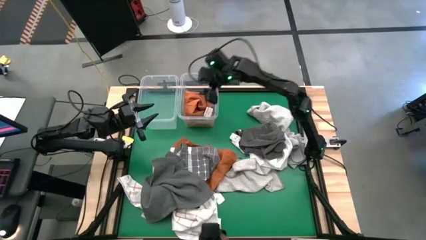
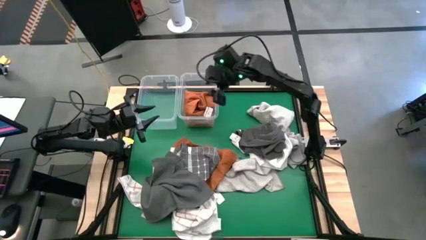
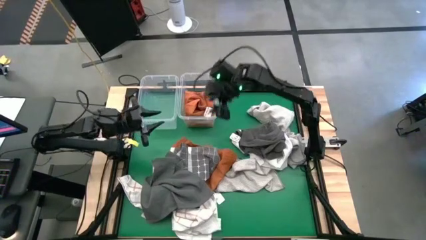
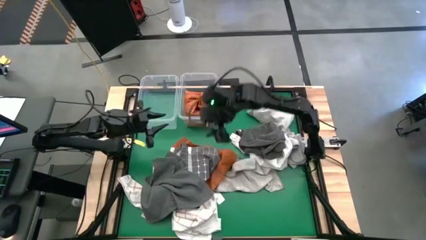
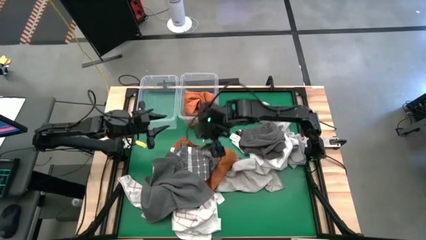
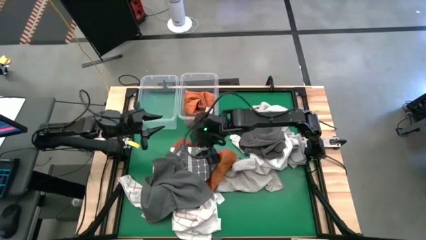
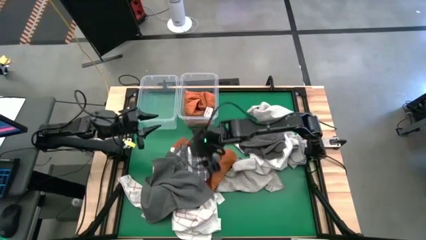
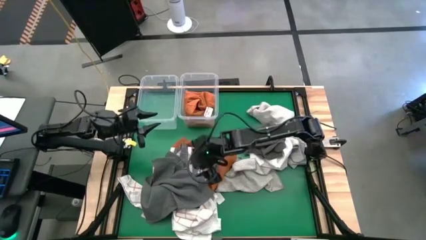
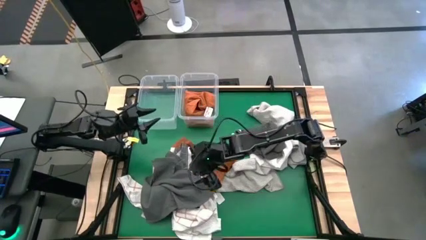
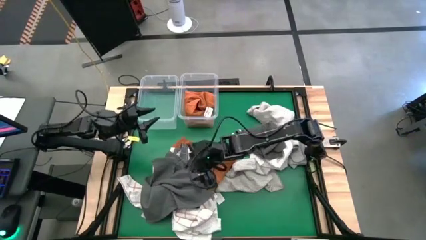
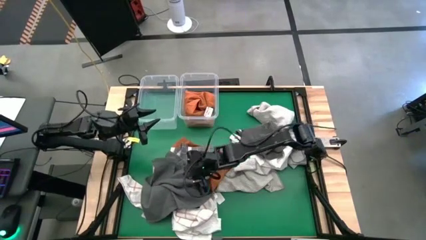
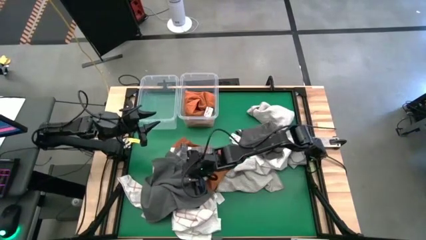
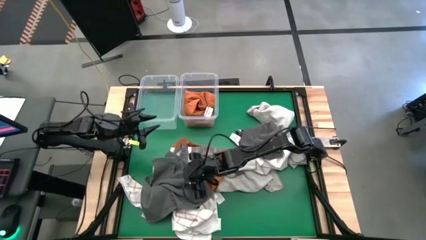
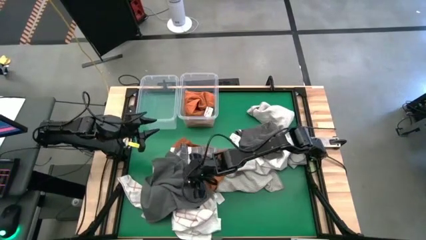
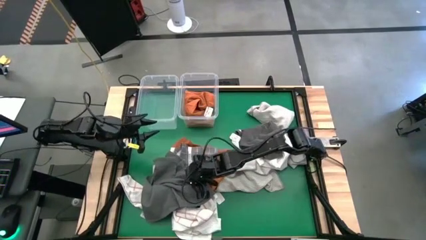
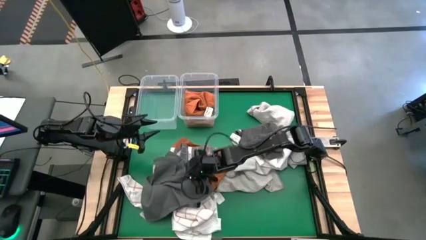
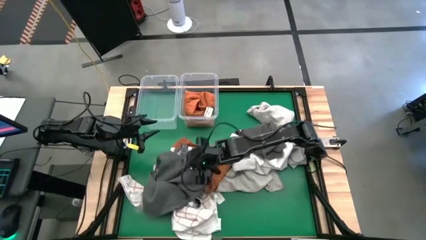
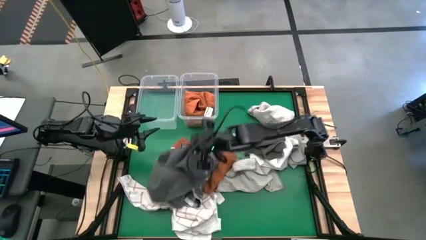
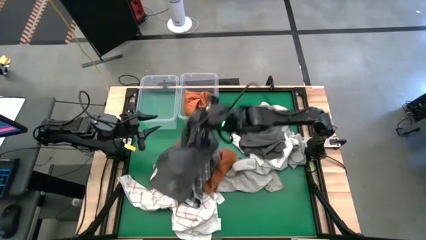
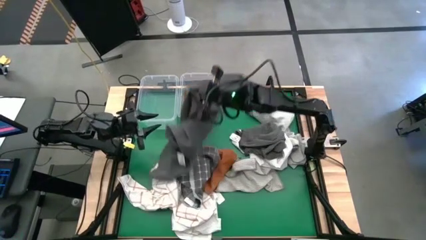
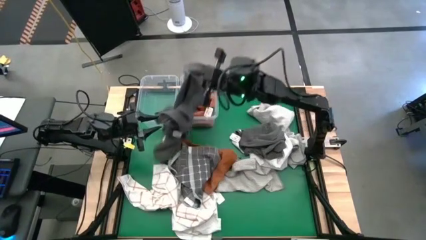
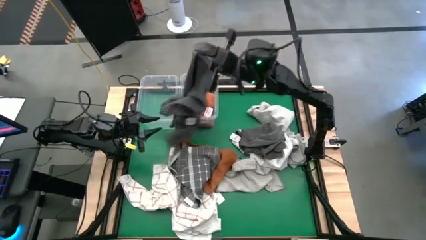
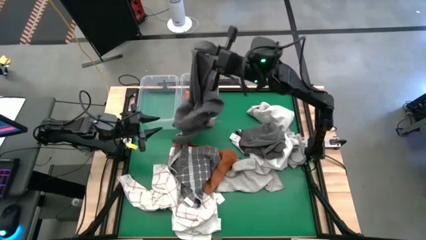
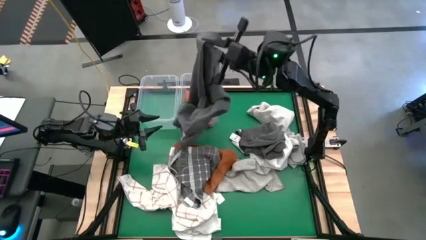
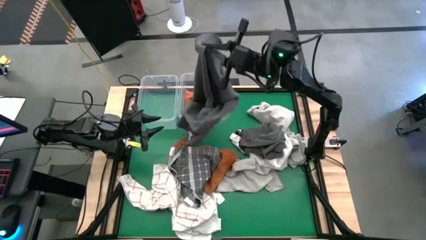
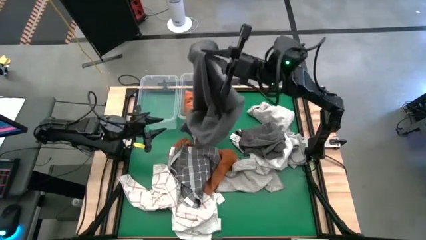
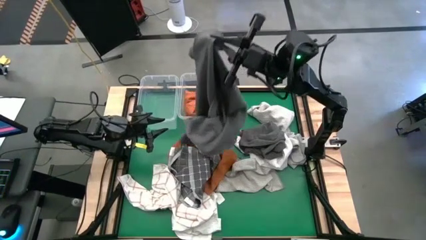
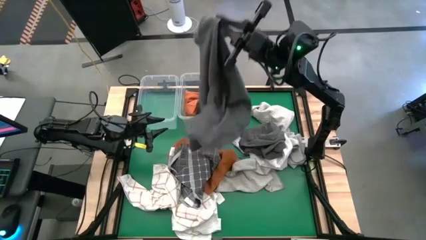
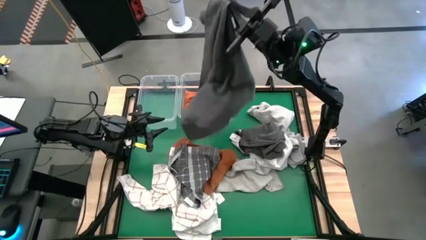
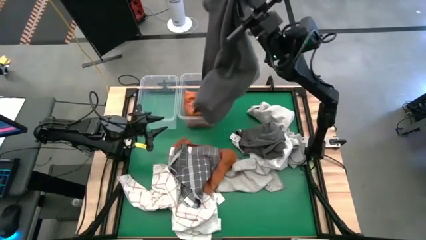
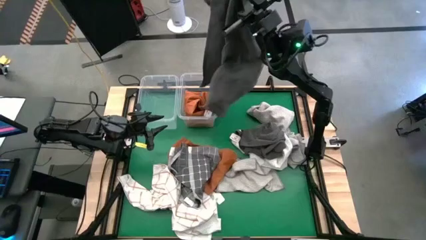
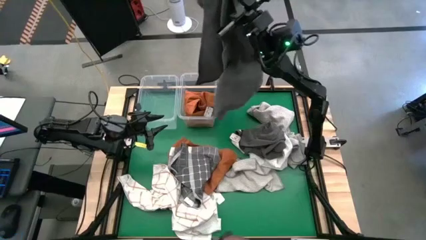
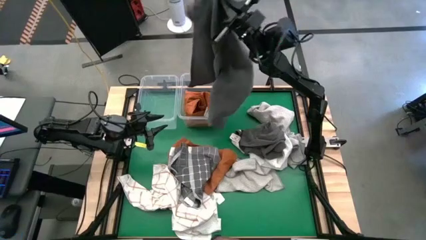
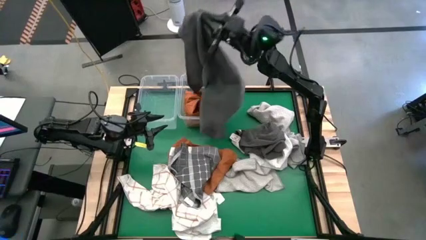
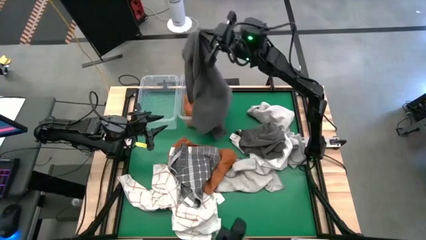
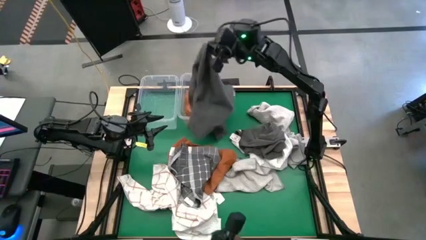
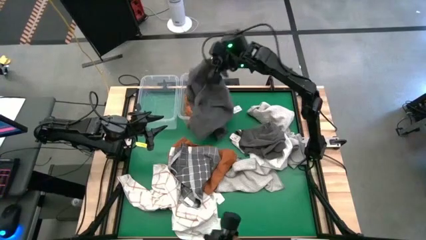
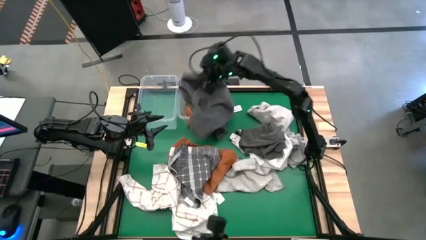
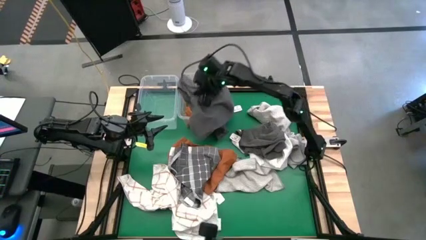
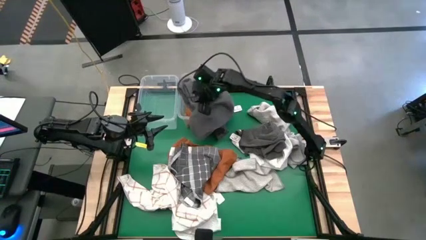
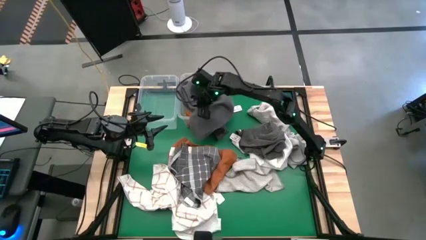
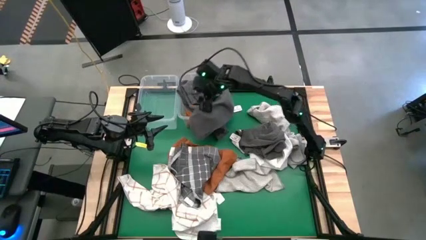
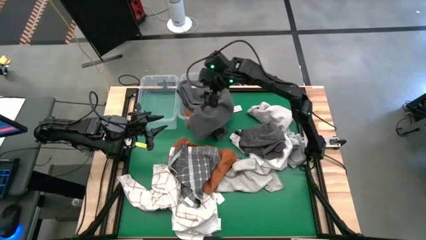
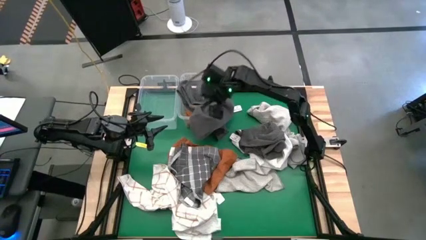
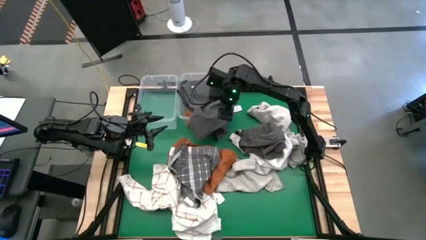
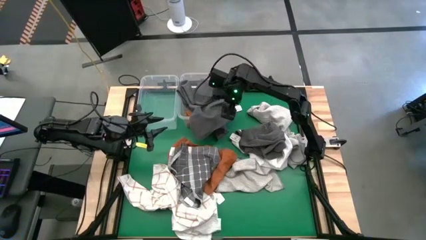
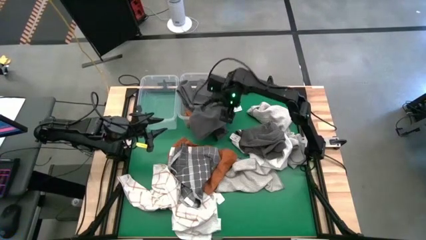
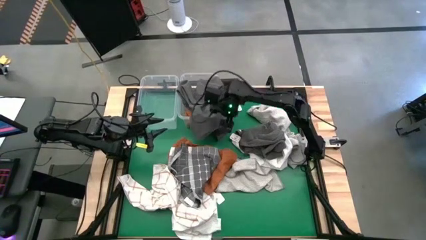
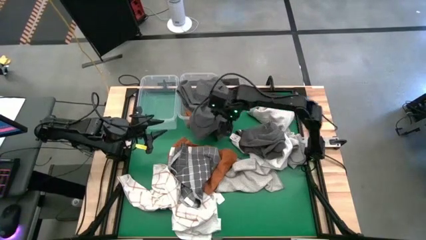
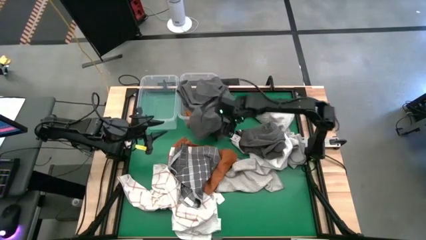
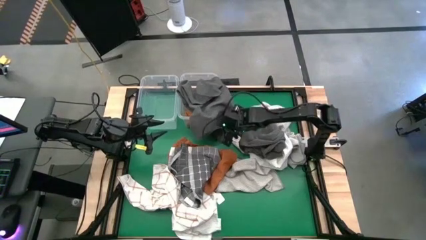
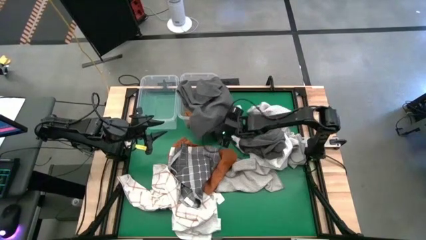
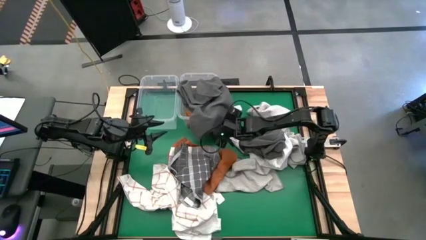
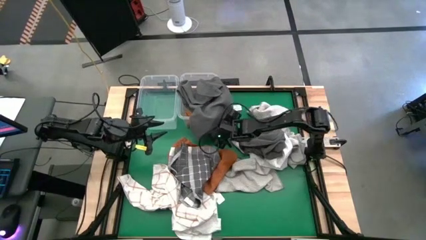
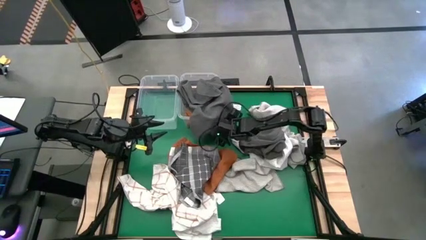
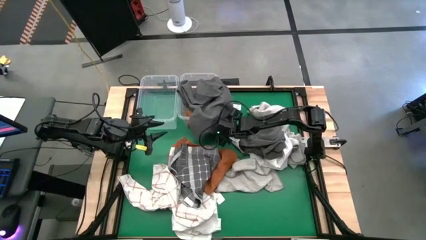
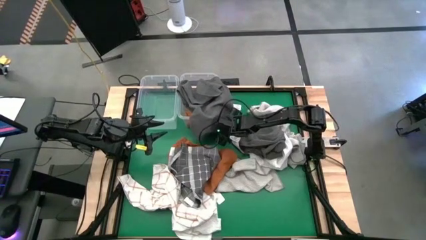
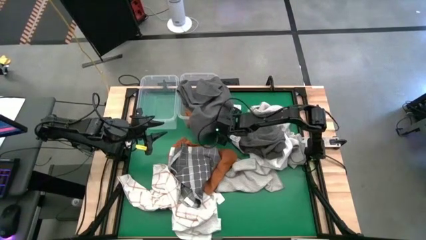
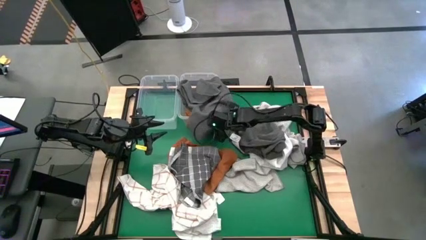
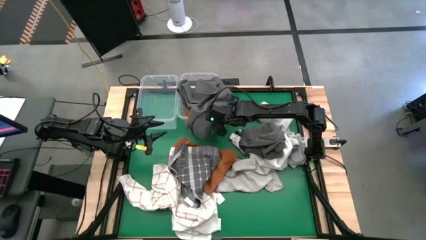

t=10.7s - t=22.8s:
Task: Sort towels by color in basket
Put the dark gray towel into the right transparent bin

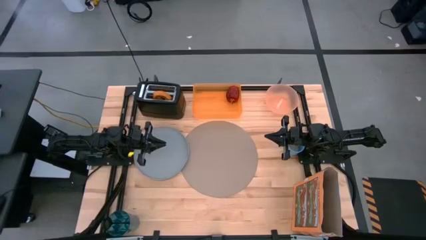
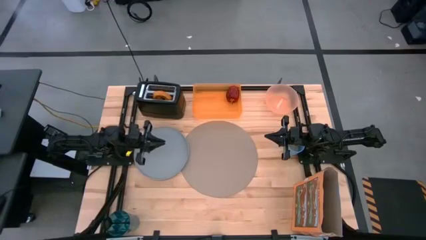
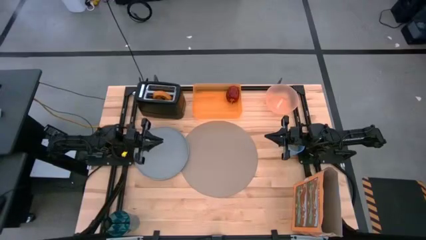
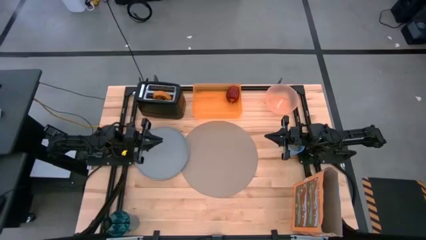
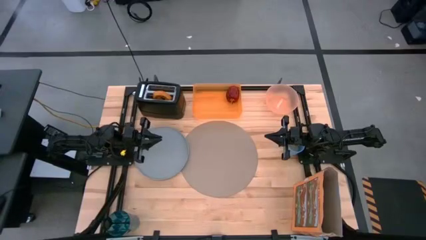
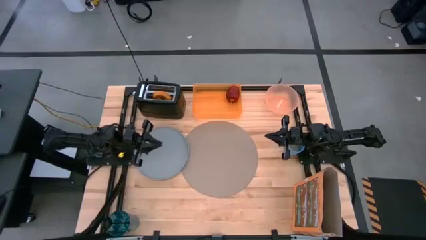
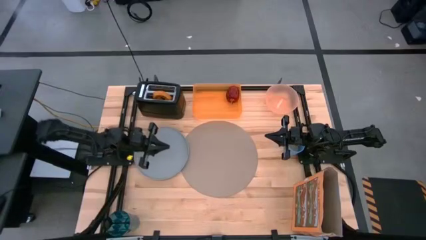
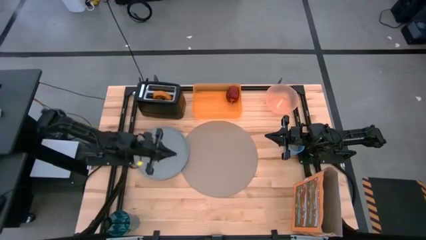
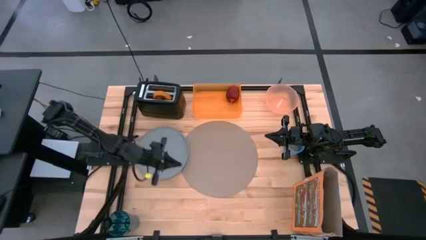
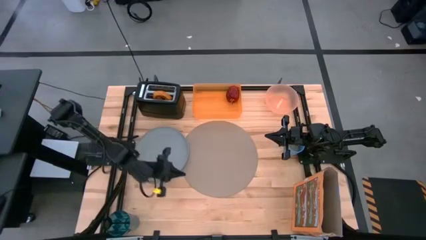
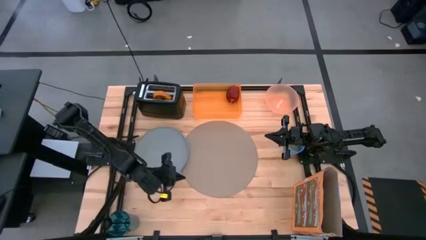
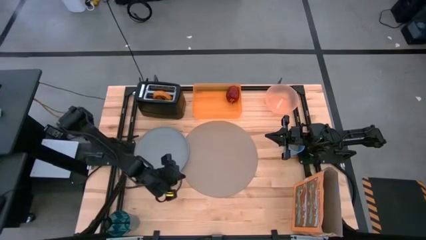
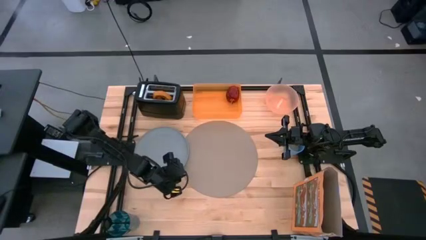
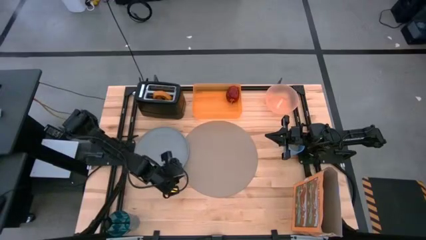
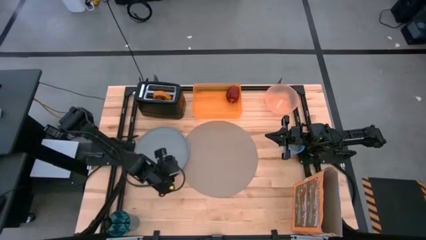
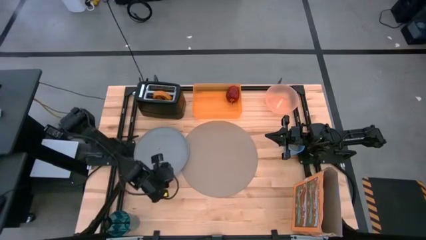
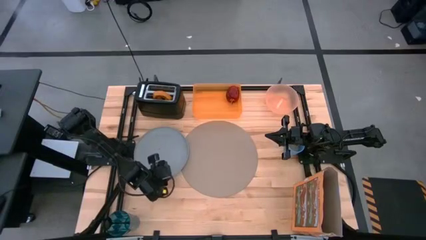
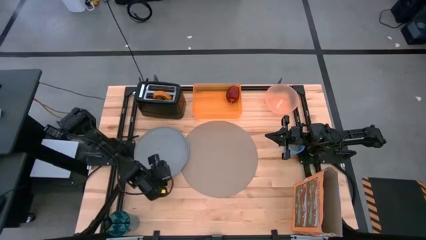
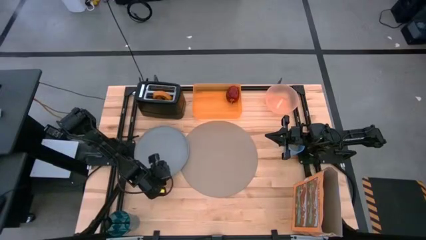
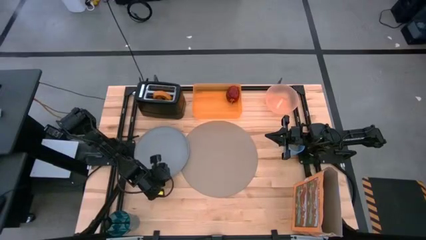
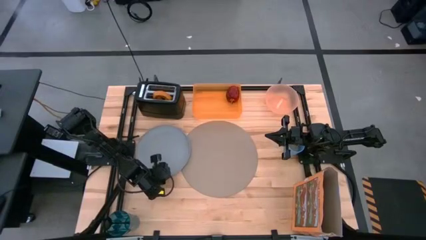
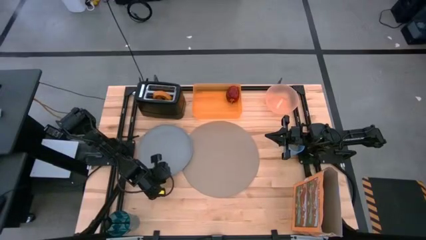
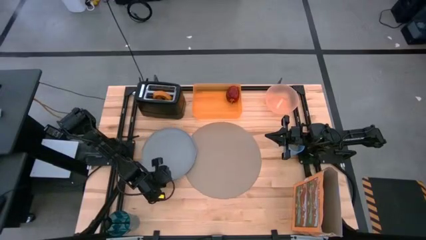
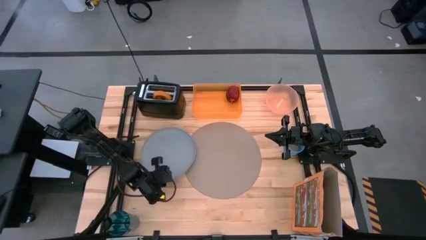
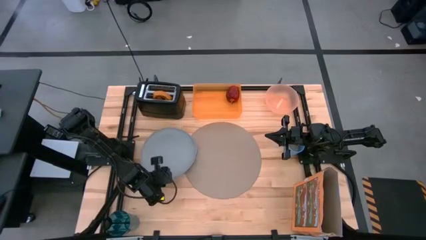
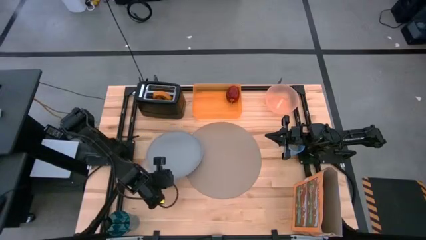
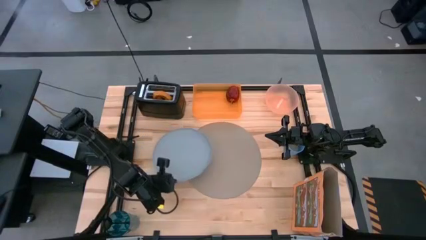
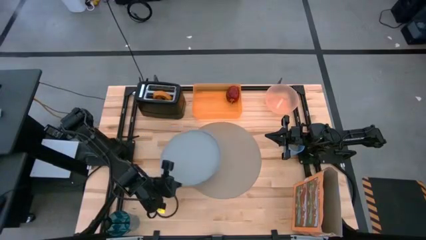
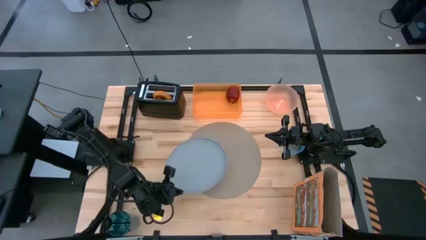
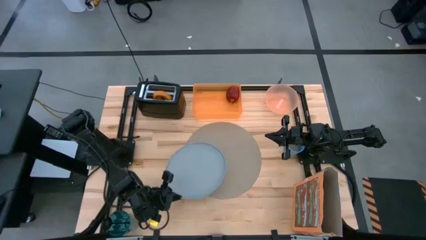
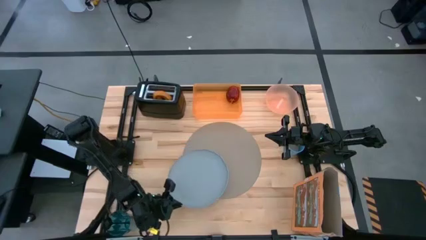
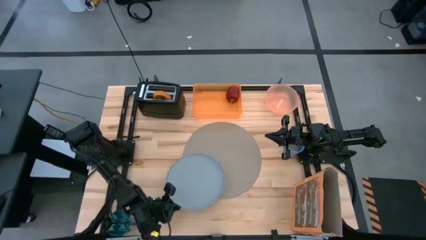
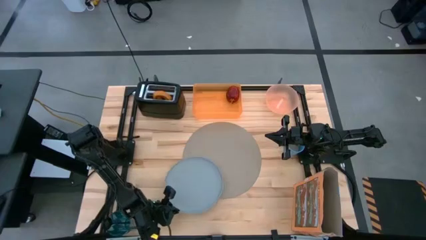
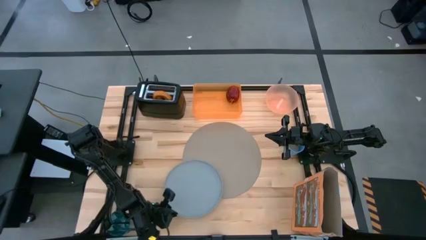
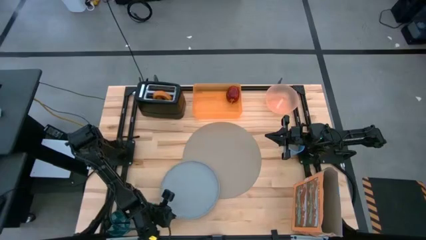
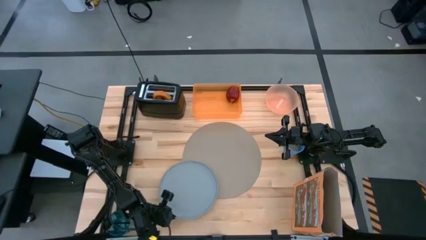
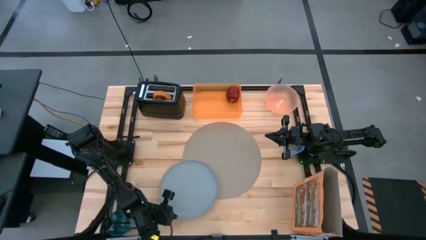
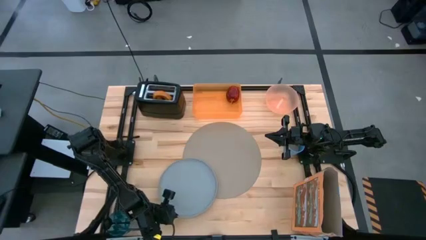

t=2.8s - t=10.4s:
Task: Arrange a breakfast setting
Put the gray plate to the bottom left of the brown table mat
